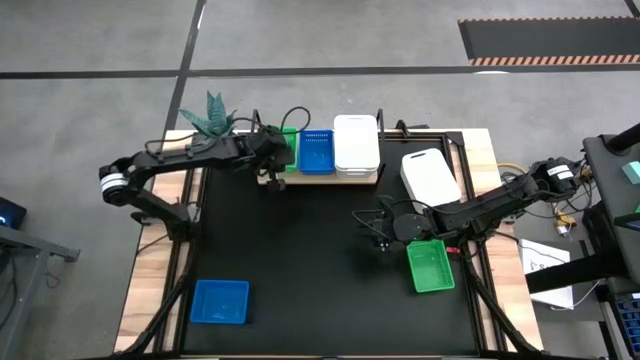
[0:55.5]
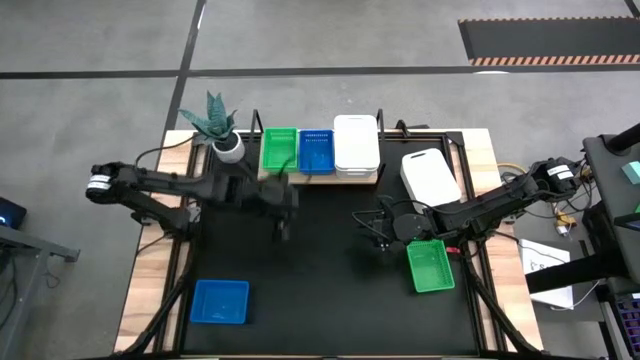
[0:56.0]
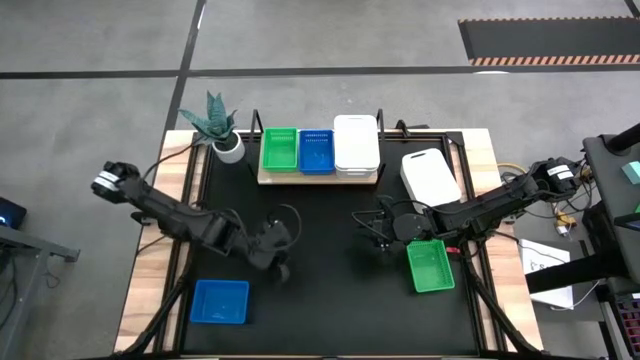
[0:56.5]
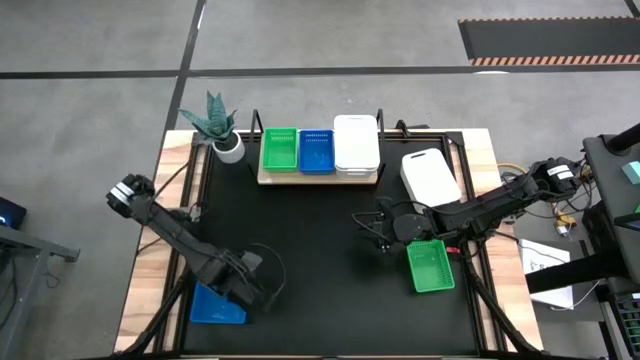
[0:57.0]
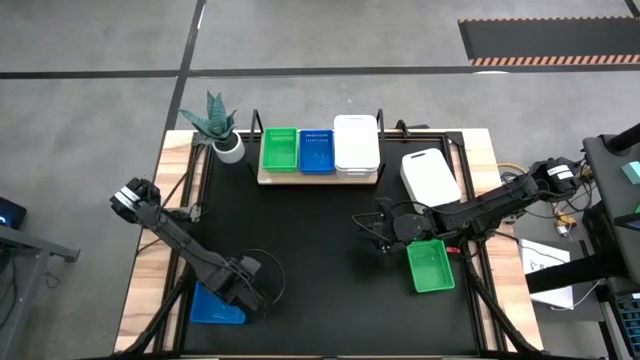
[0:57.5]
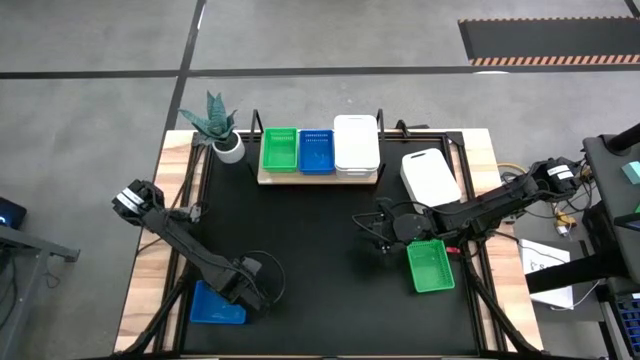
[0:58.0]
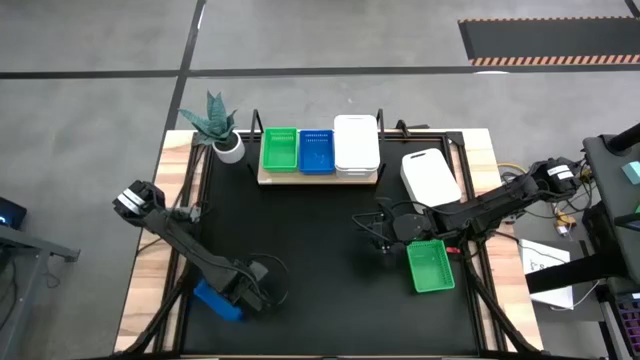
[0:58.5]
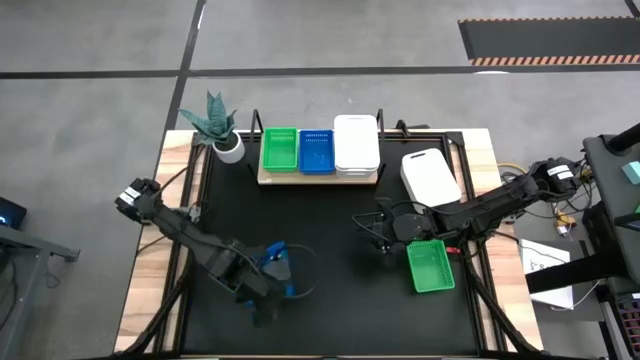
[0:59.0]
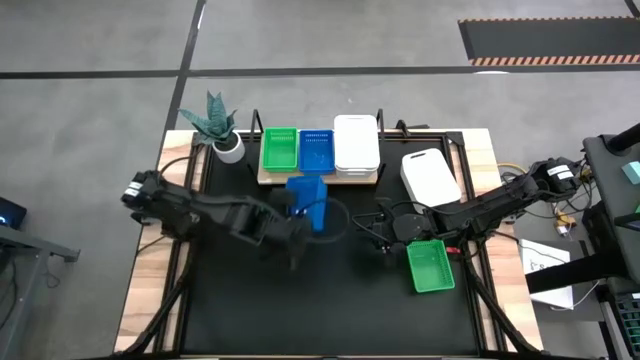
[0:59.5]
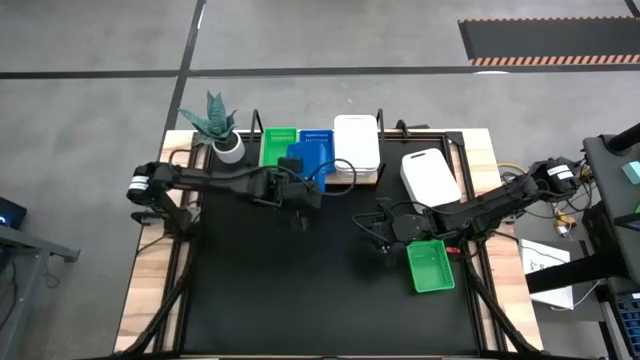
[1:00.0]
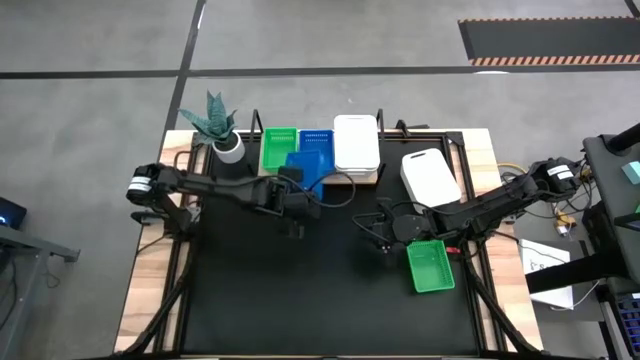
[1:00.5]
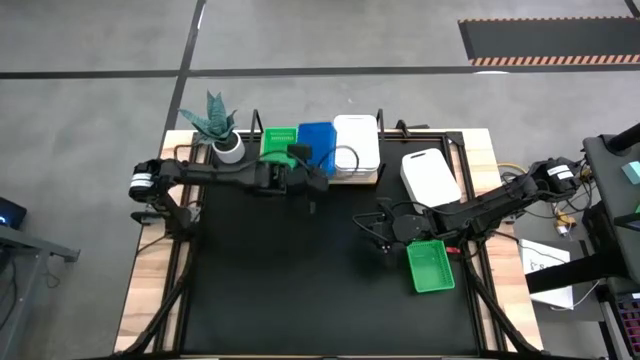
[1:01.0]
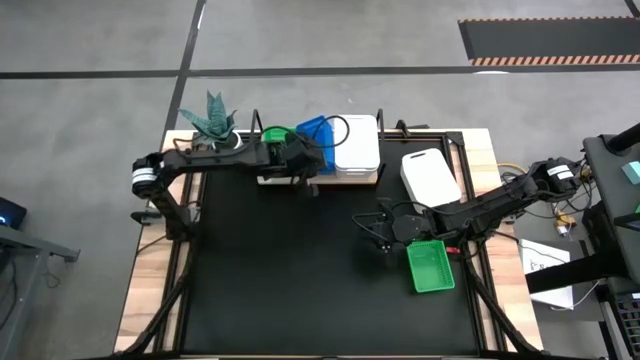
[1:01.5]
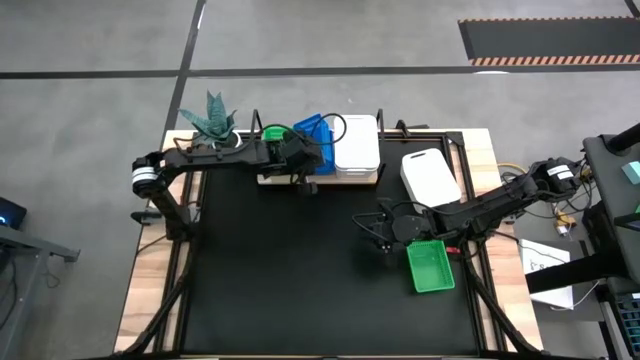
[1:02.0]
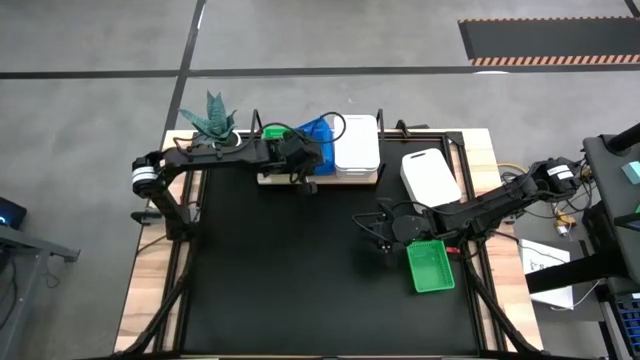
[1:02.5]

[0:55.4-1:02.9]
Task: Stack baskets on shelf by color
Stack the blue bin on top of the stacked blue bins on the shelf

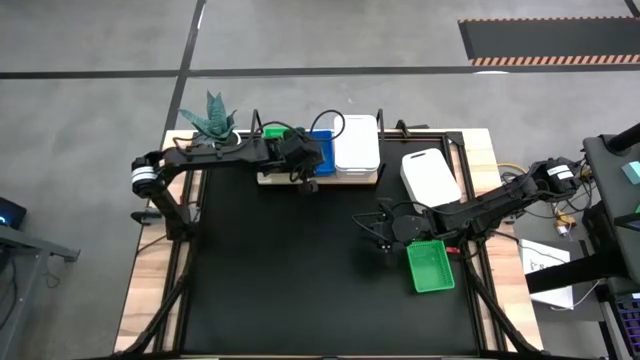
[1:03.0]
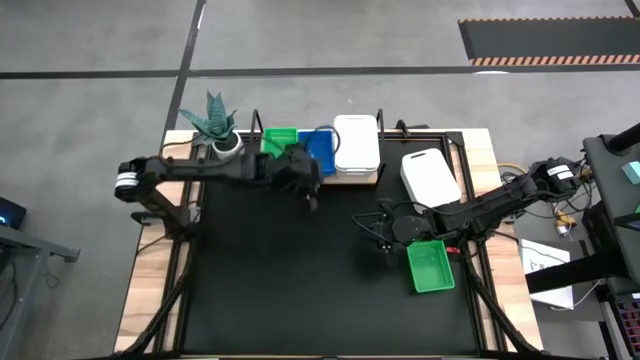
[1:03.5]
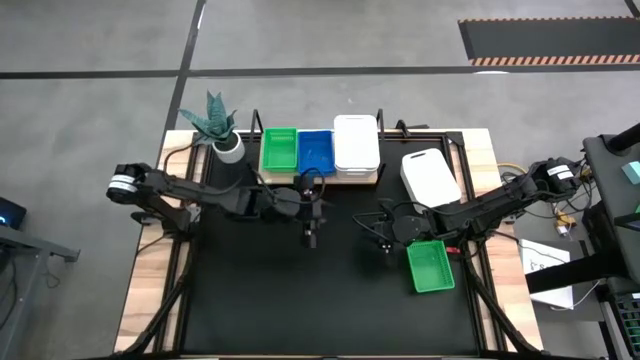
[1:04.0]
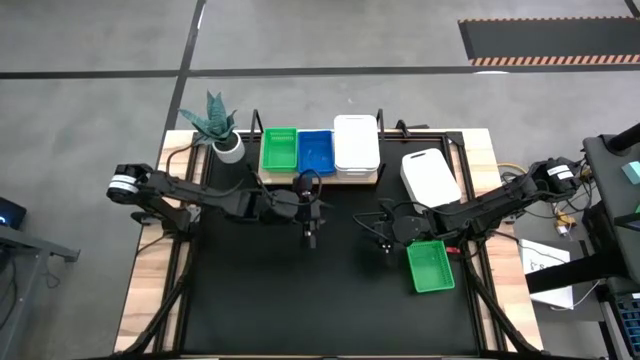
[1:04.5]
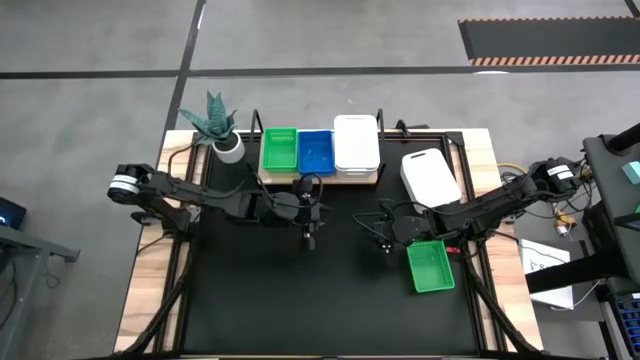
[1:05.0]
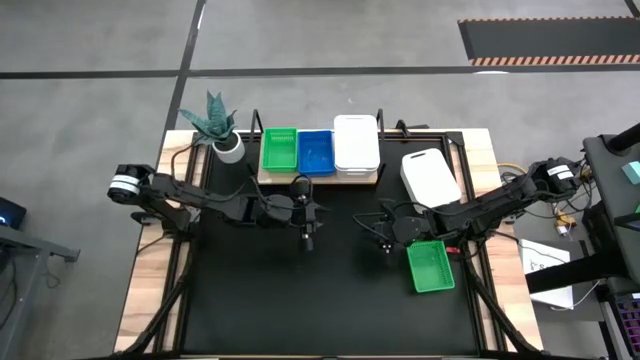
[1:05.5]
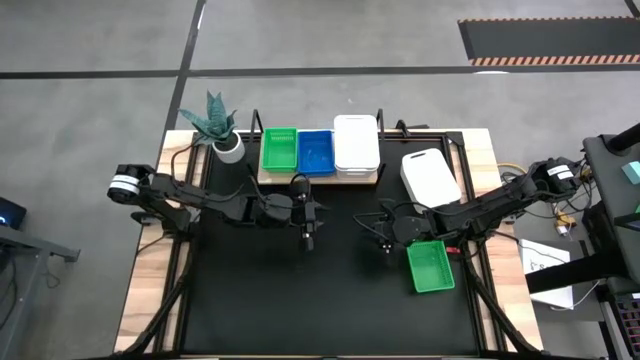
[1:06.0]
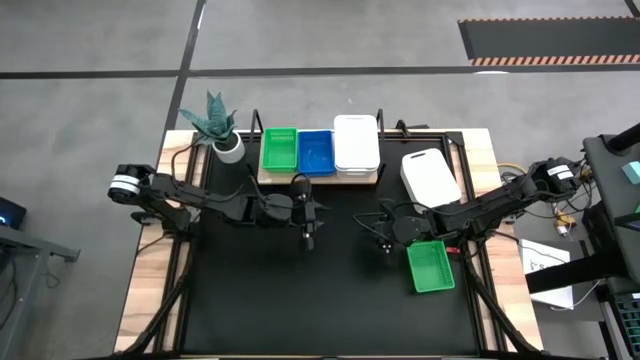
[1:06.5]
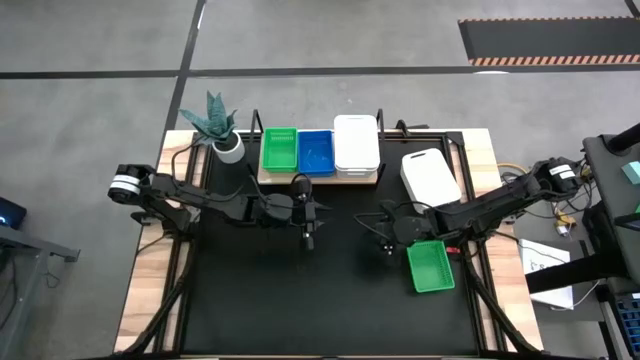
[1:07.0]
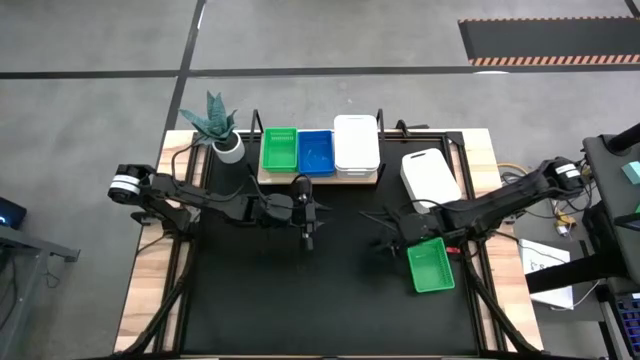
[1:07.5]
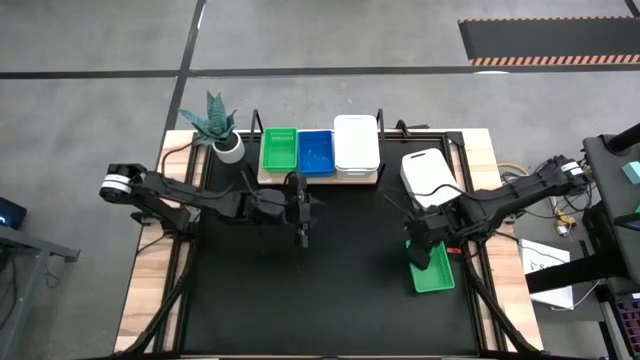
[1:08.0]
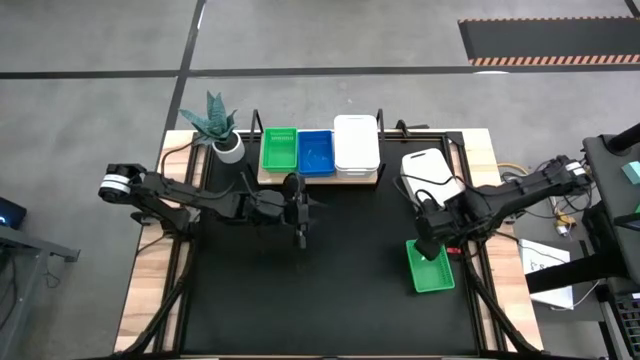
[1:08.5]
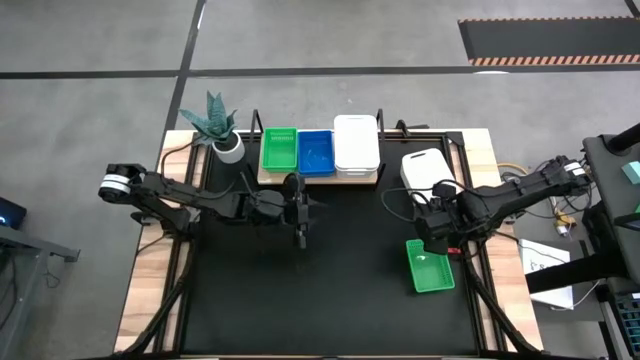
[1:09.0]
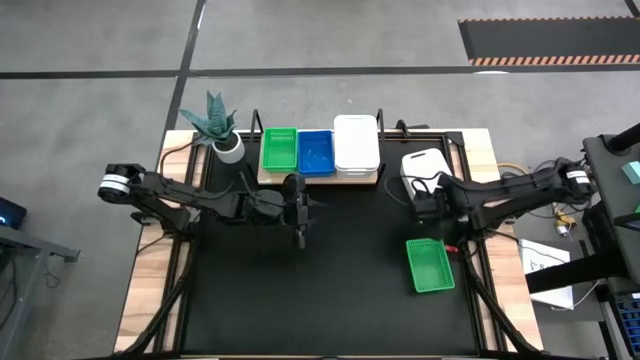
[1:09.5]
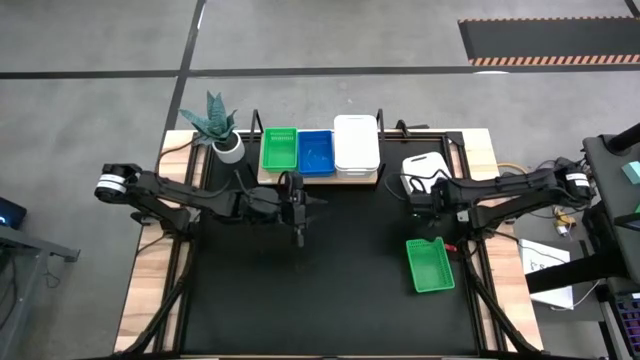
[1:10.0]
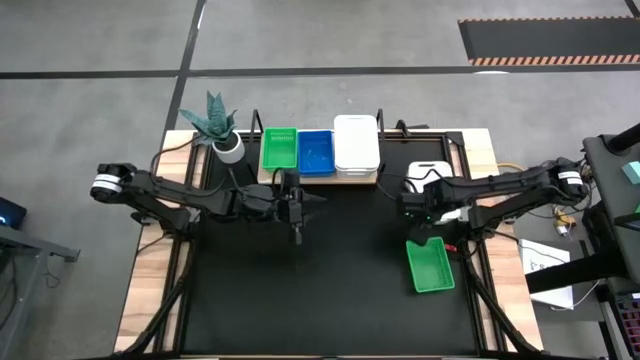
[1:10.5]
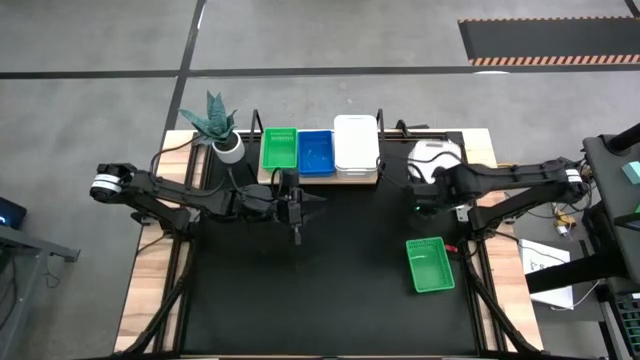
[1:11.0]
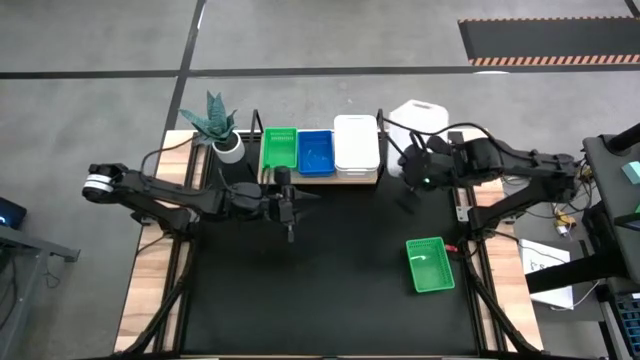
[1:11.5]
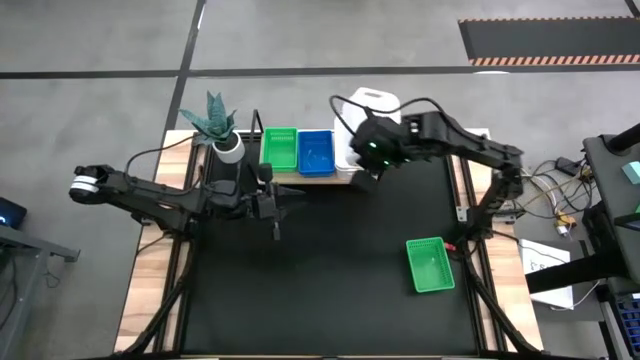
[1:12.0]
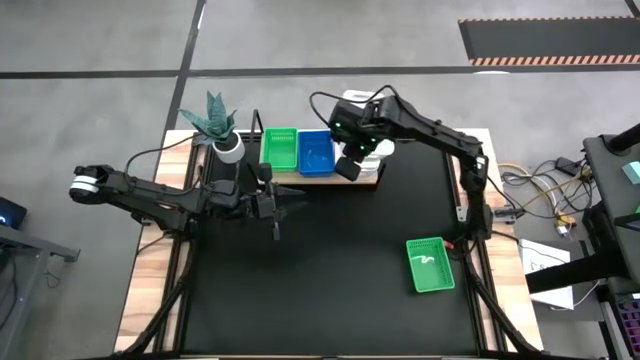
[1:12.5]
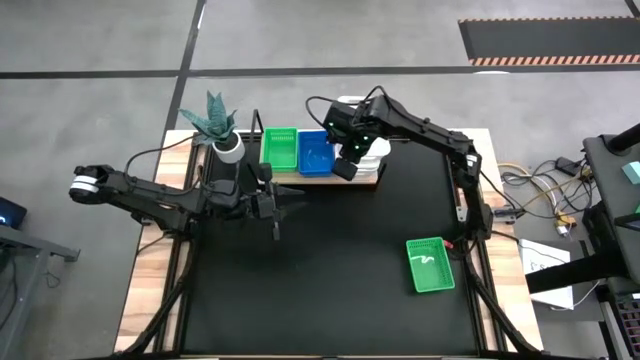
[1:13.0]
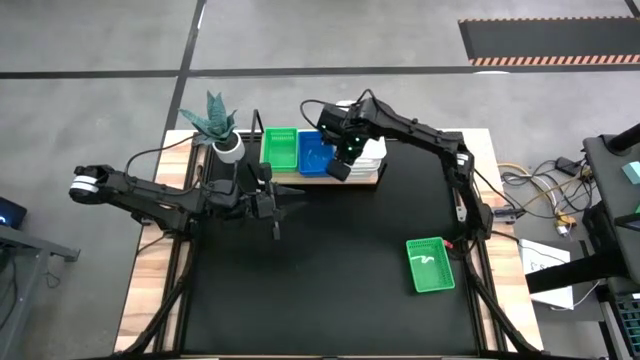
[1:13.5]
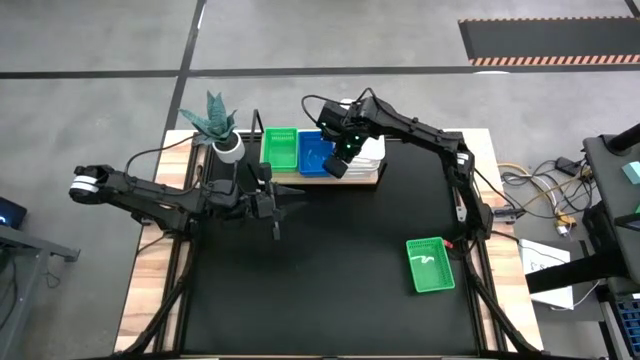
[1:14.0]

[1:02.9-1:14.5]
Stack the white bin on top of the stacked white bins on the shelf
